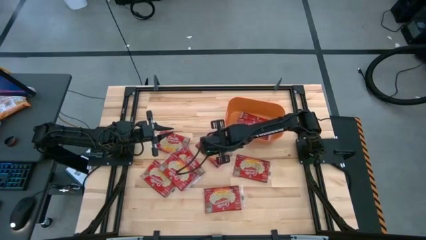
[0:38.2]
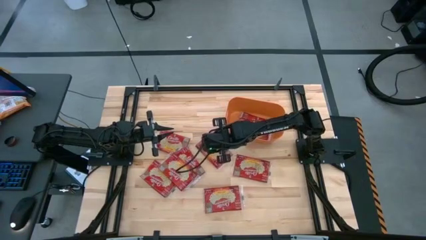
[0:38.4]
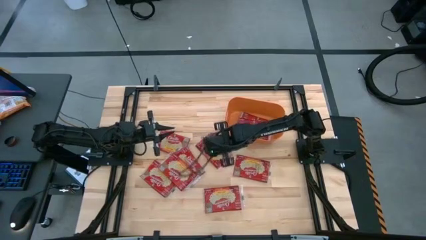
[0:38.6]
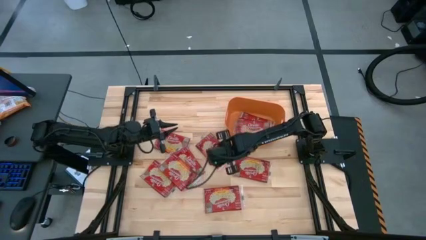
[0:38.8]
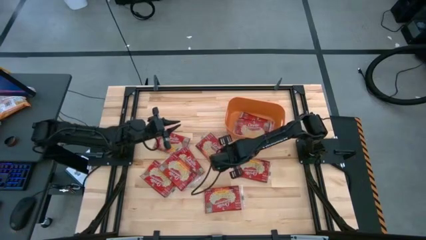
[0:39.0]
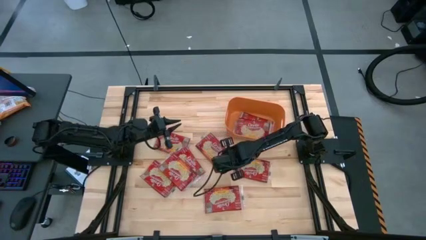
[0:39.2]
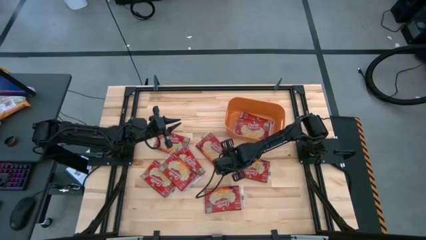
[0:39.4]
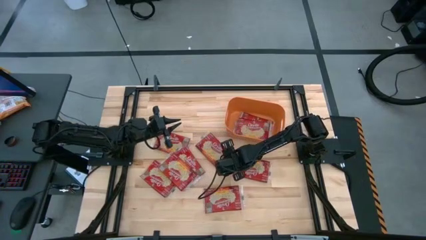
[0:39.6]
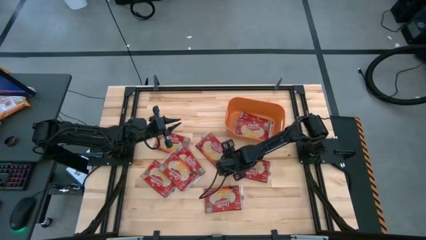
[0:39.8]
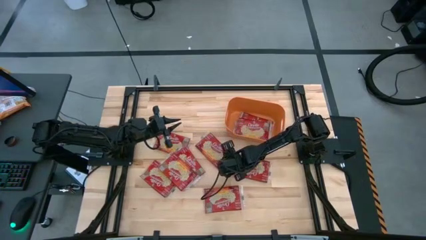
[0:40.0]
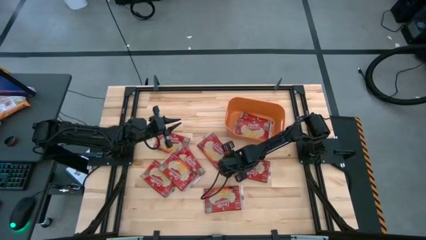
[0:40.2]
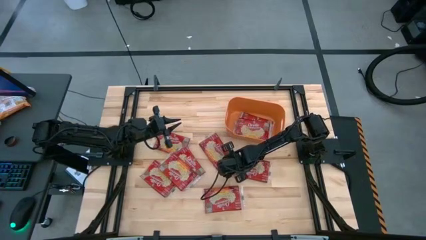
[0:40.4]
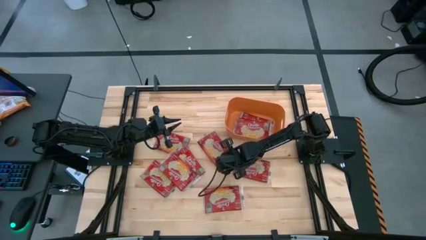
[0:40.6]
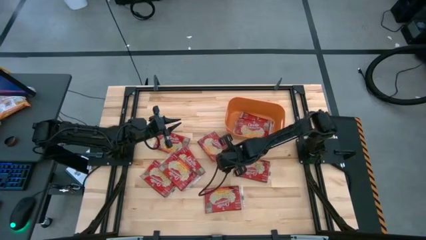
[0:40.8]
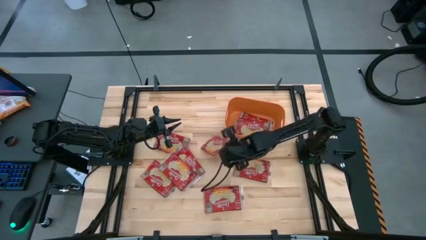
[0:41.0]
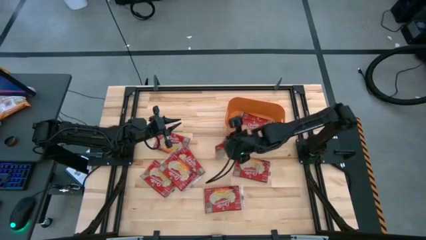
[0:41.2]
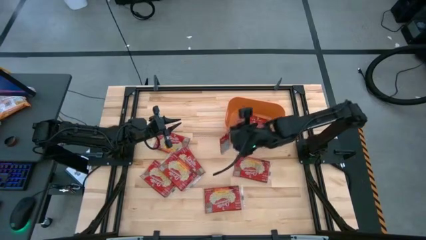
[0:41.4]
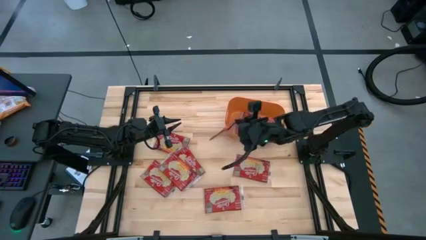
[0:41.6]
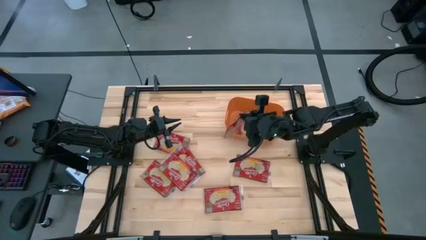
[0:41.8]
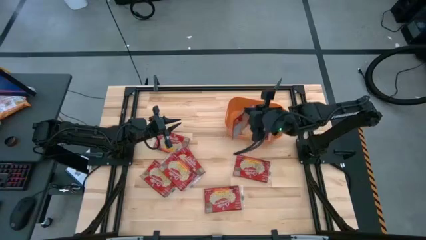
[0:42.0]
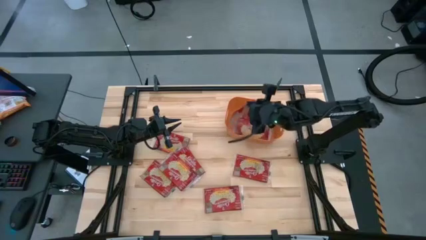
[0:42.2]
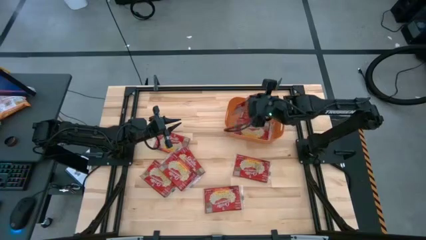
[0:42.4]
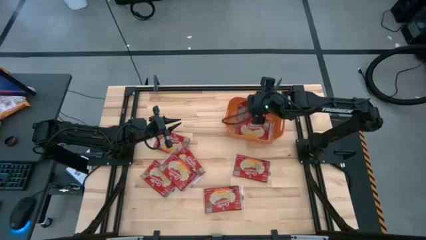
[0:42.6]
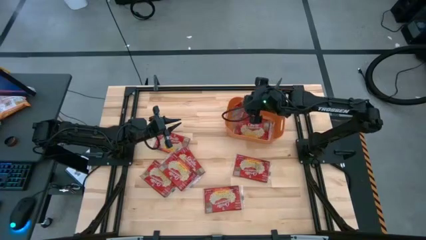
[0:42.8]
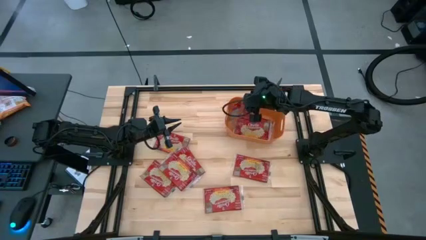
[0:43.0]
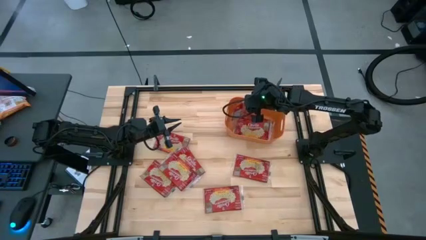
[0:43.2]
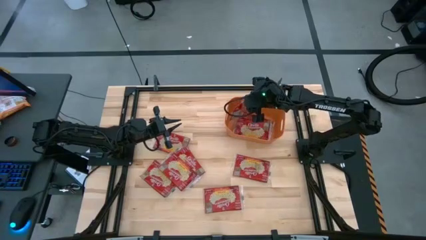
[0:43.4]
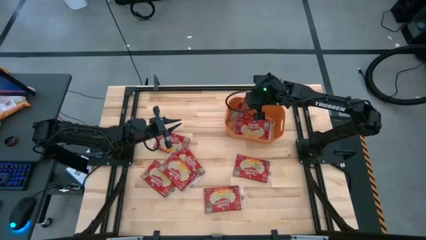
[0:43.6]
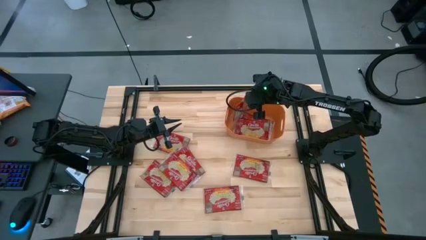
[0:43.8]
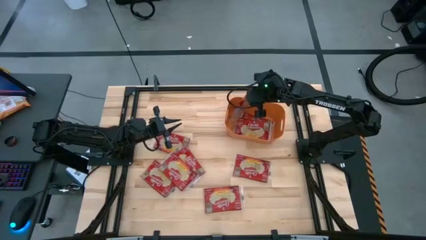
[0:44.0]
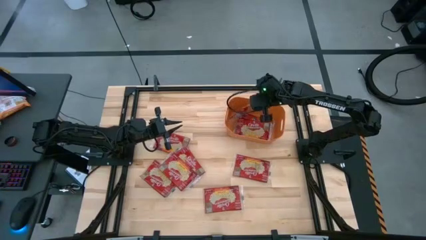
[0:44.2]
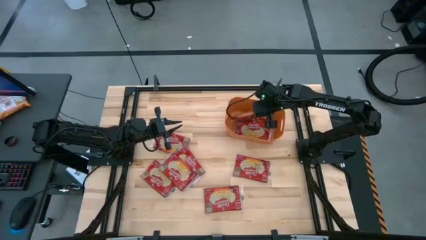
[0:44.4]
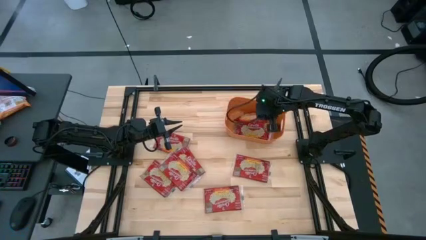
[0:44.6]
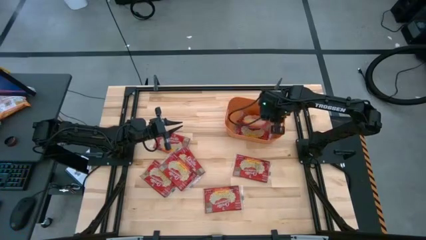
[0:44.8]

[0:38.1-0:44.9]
Task: Sort popcorn bags into baskets
Put the popcorn bag into the orange bin

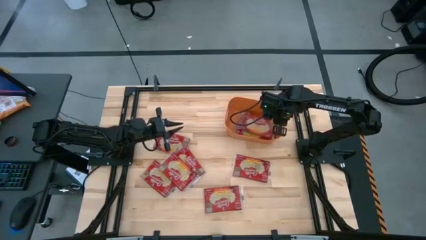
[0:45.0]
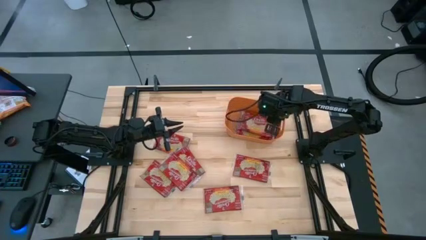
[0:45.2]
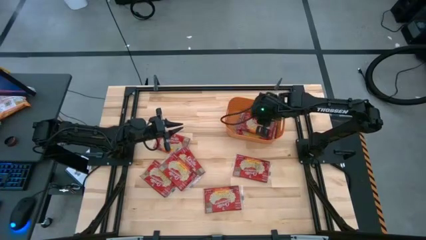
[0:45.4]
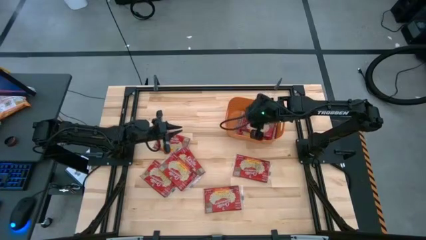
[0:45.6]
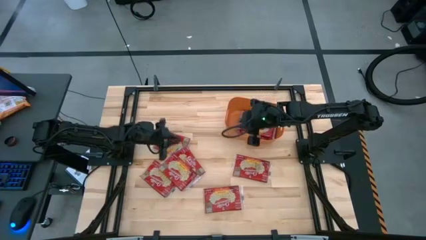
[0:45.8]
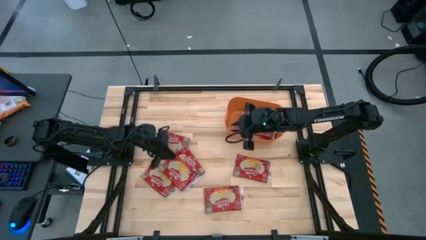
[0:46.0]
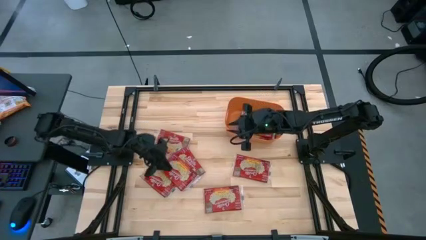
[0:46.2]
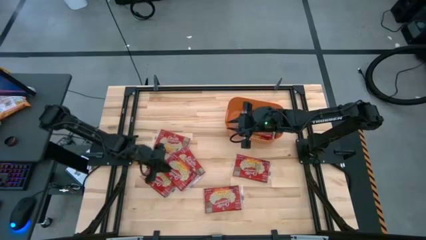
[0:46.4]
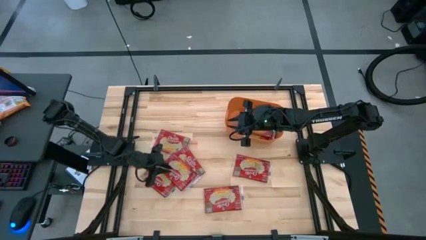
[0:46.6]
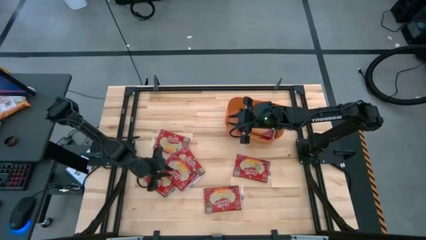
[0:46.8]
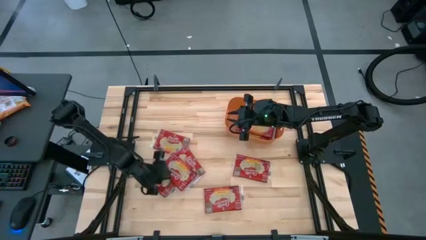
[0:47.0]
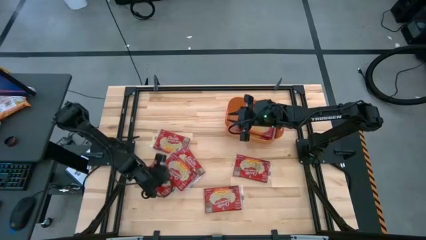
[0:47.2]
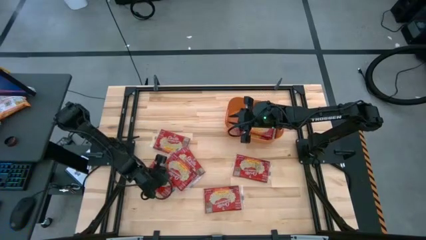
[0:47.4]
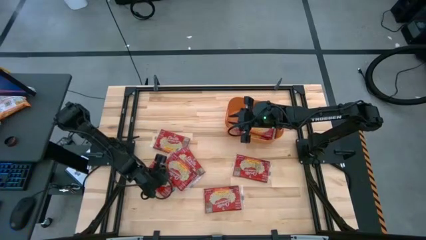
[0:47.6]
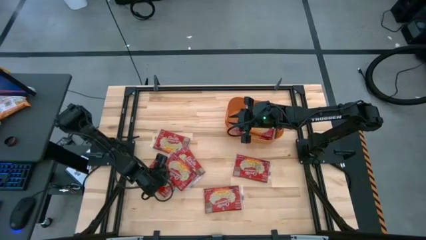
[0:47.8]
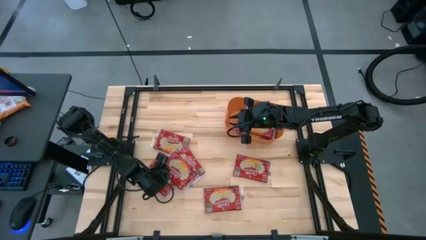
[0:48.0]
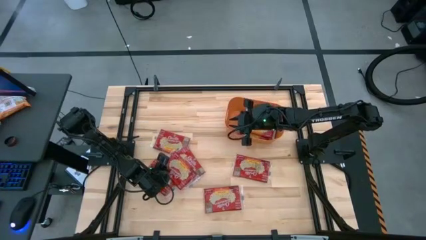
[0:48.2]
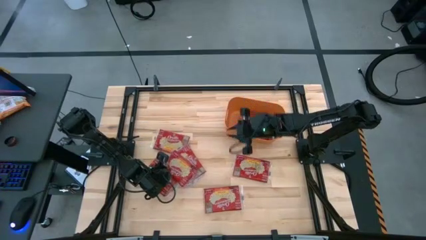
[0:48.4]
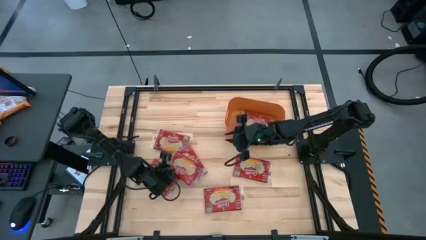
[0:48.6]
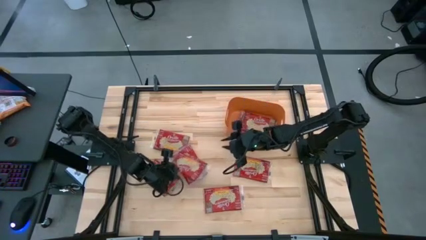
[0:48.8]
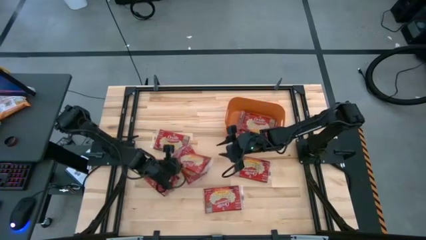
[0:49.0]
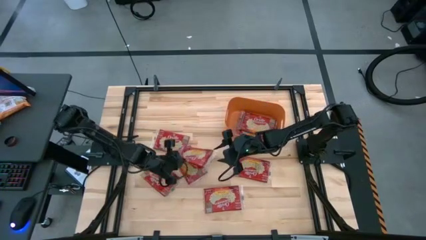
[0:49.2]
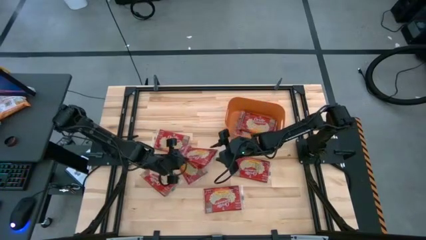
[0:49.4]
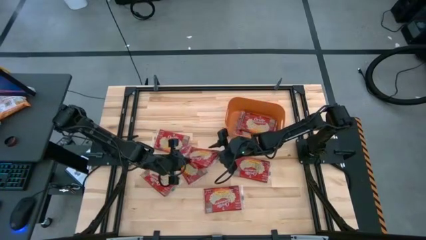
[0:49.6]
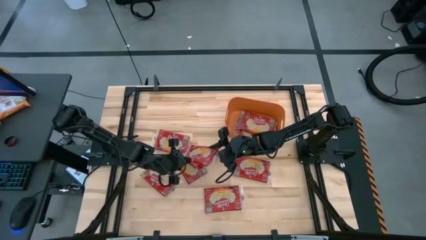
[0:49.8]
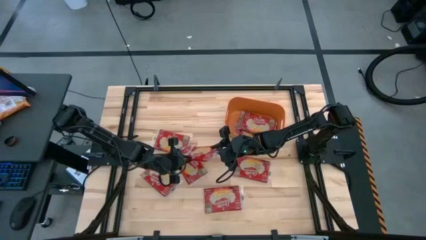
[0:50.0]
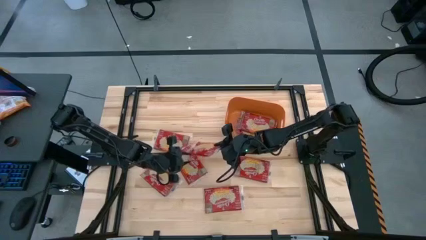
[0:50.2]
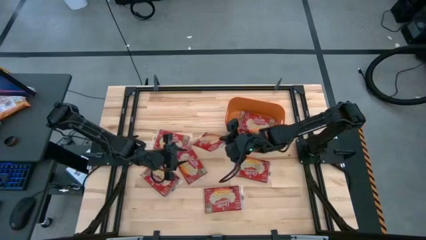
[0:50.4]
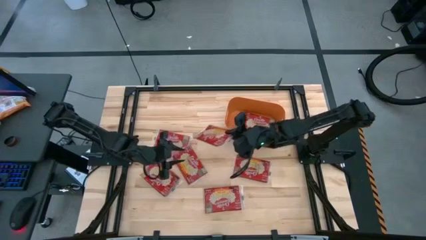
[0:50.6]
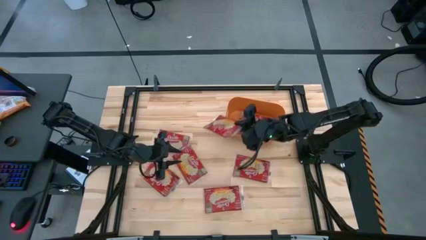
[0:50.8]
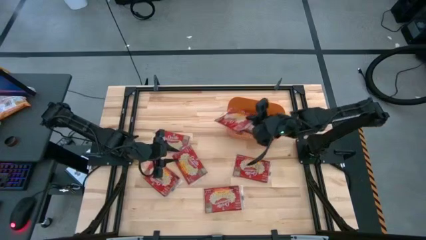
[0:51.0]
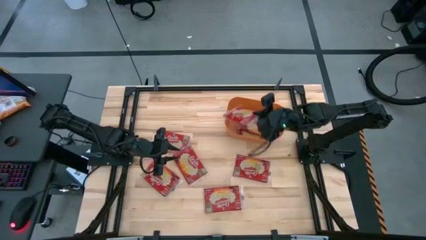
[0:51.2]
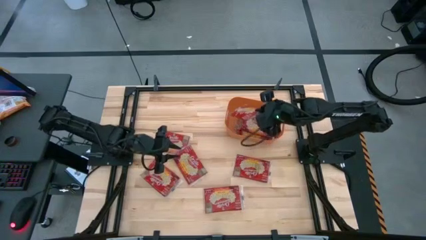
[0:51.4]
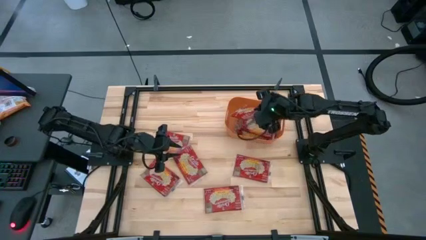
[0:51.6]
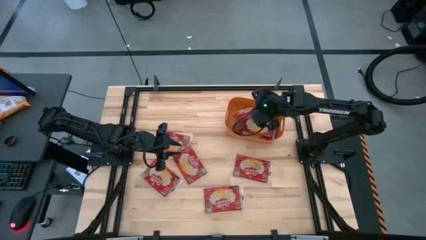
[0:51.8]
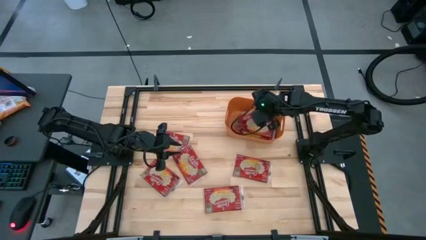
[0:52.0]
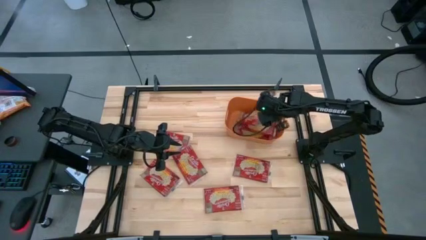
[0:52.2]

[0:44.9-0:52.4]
Put the popcorn bag into the orange bin

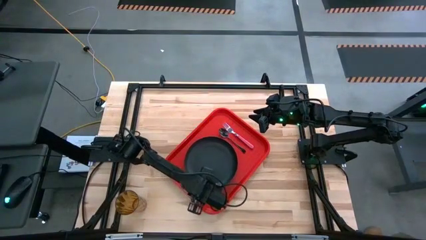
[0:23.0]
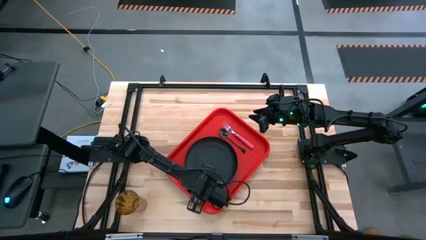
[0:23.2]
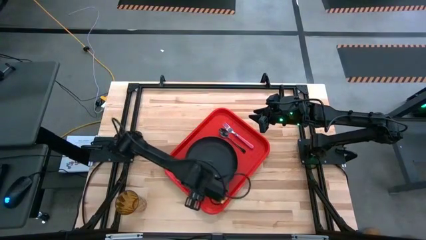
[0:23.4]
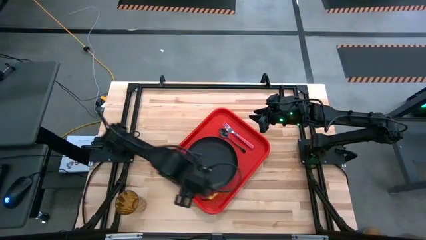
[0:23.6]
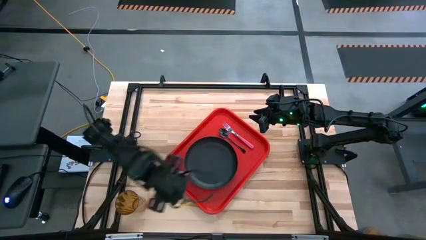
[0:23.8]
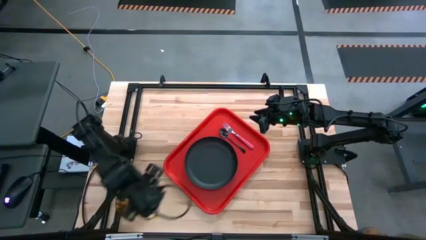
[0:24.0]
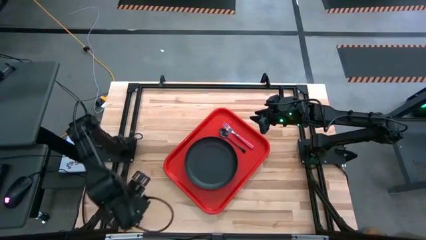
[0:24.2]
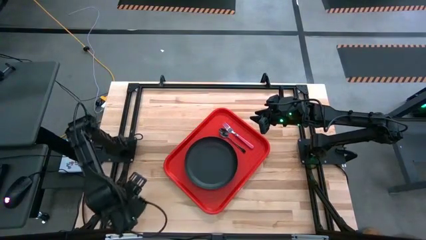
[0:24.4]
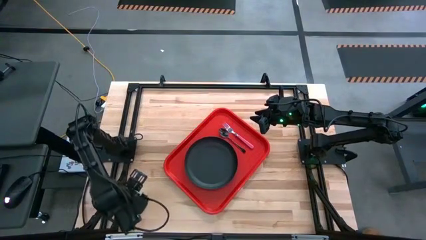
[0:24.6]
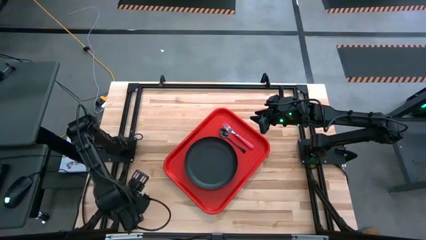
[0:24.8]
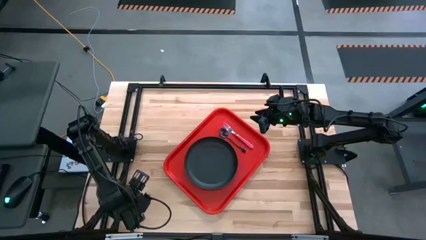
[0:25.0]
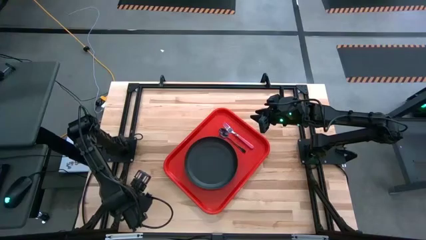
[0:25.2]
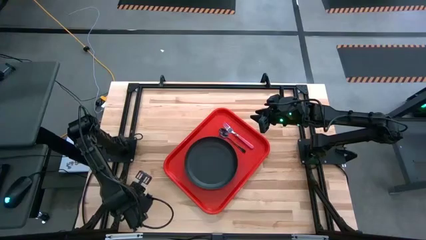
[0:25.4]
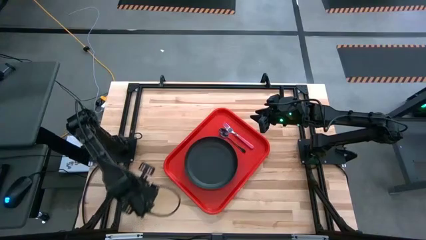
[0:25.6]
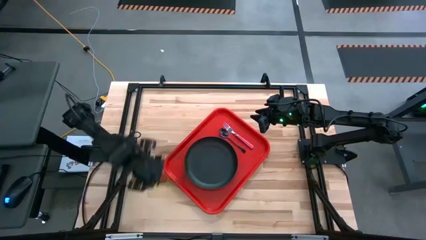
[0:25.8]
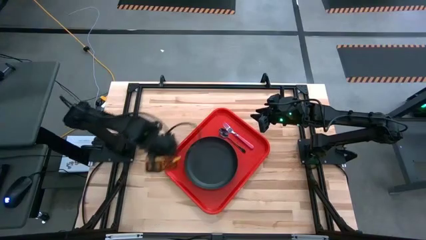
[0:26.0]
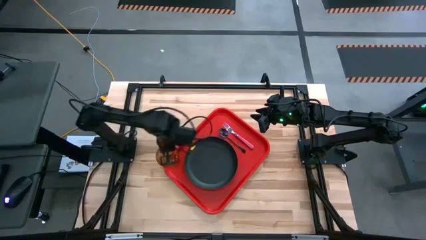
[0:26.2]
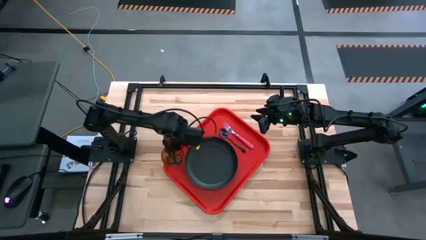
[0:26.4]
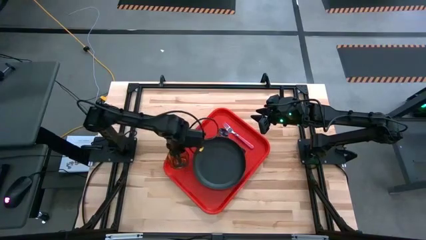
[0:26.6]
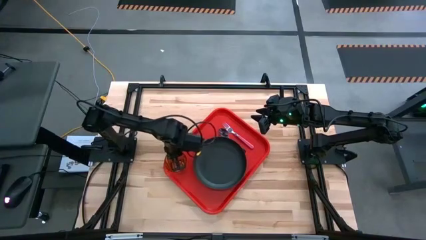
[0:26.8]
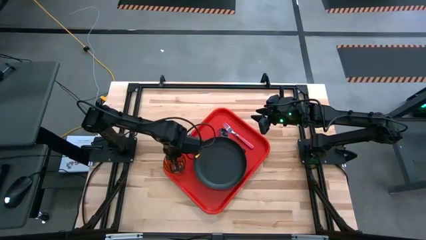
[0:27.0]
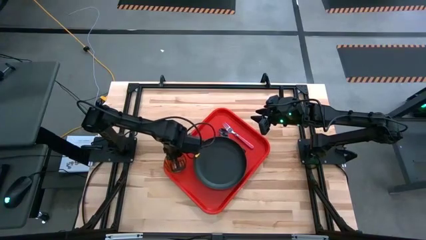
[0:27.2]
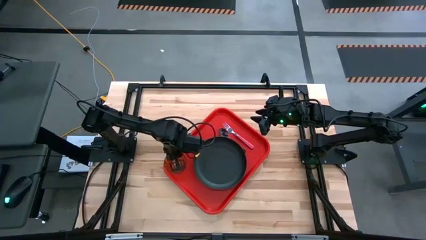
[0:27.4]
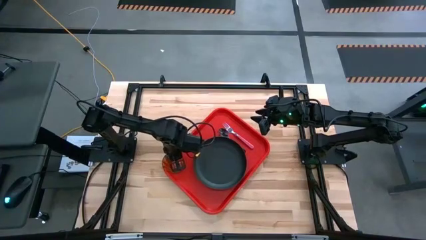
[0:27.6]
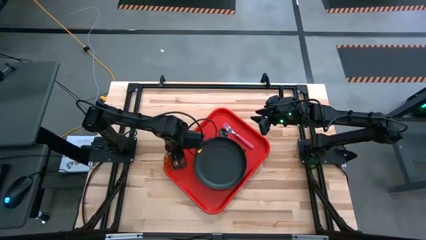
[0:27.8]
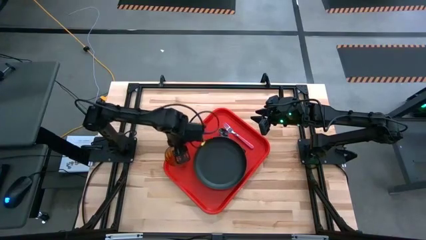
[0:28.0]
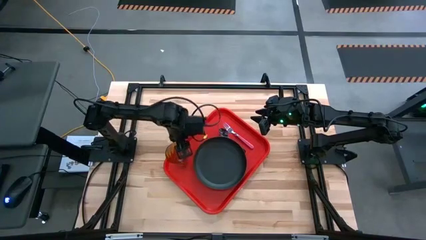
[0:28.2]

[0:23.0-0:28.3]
Task: Pick and place plate/cup/fork/spoon on tray
Put the brown cup on the left side of the serving tray
